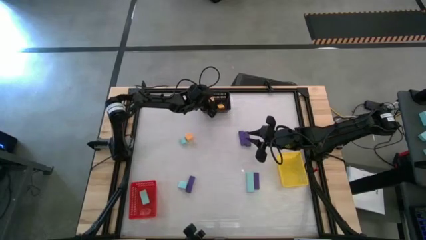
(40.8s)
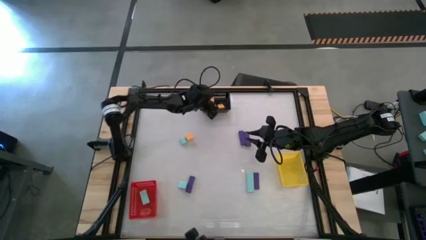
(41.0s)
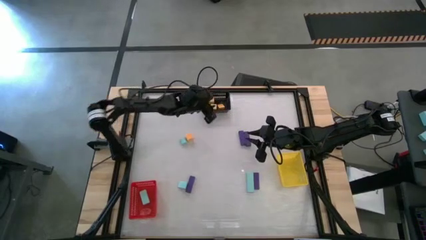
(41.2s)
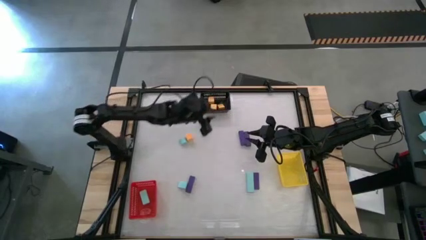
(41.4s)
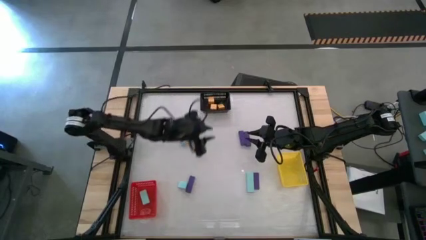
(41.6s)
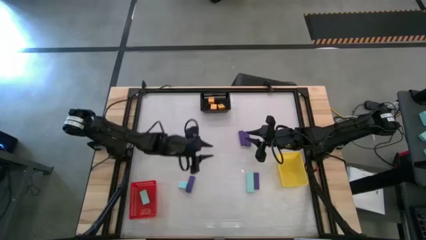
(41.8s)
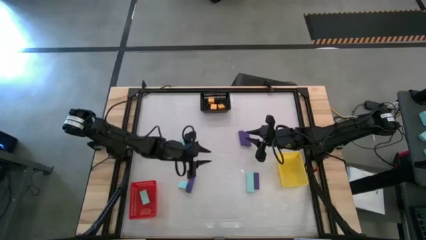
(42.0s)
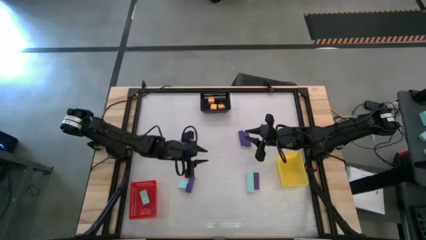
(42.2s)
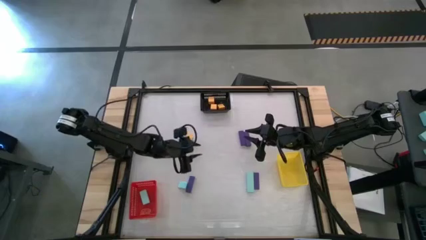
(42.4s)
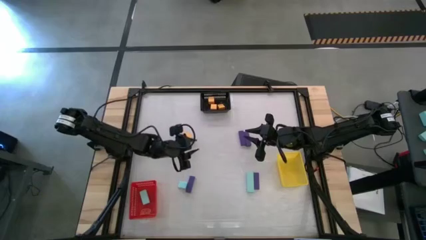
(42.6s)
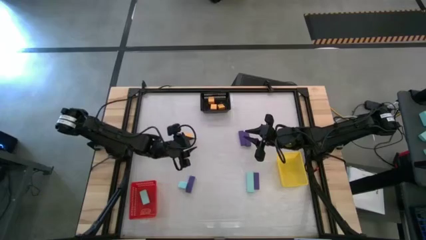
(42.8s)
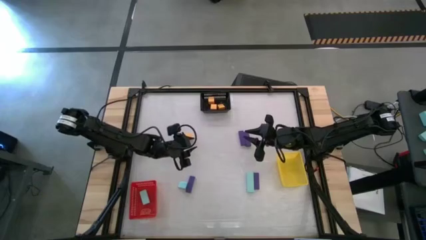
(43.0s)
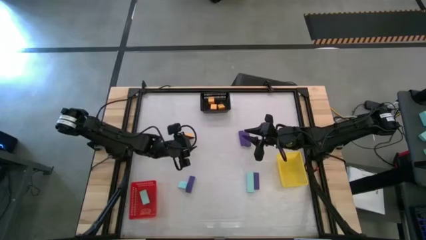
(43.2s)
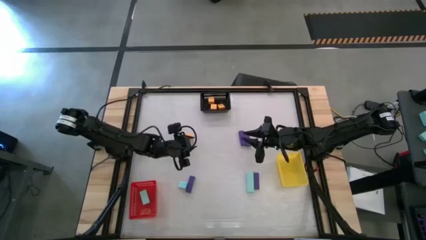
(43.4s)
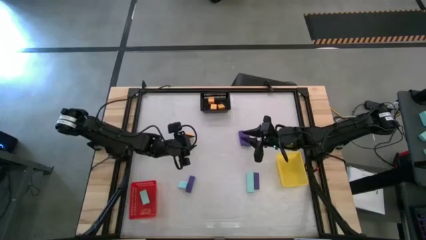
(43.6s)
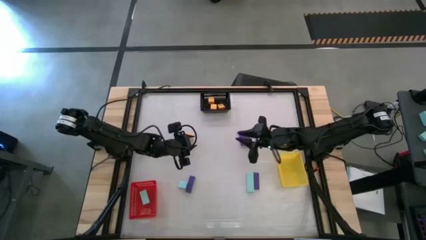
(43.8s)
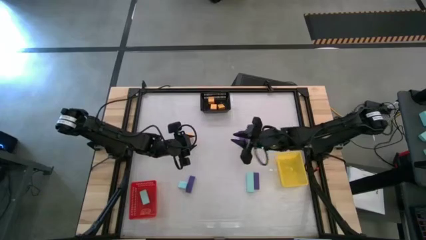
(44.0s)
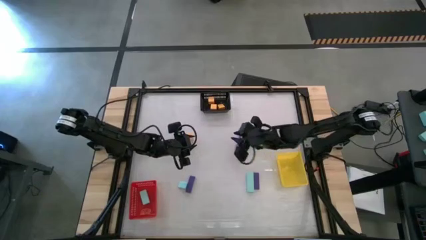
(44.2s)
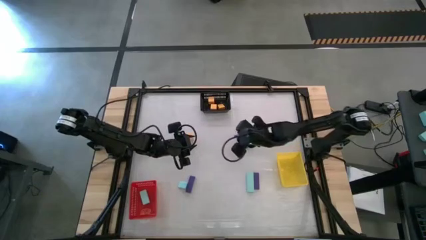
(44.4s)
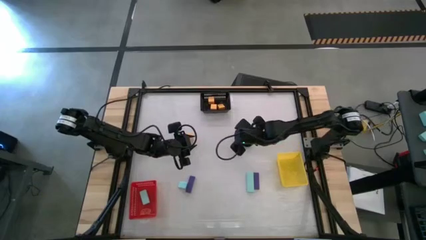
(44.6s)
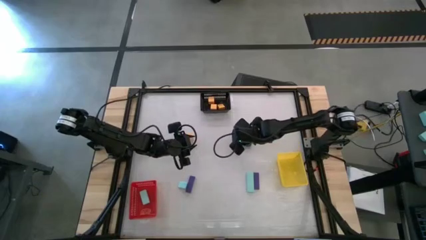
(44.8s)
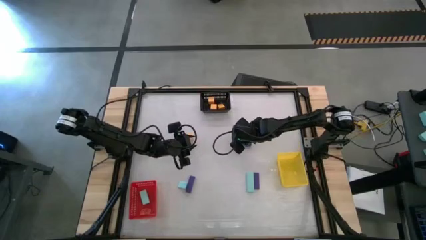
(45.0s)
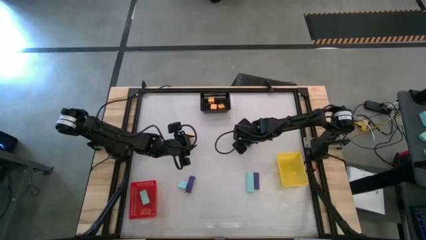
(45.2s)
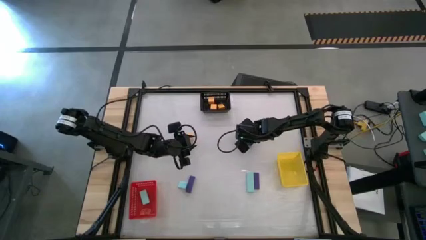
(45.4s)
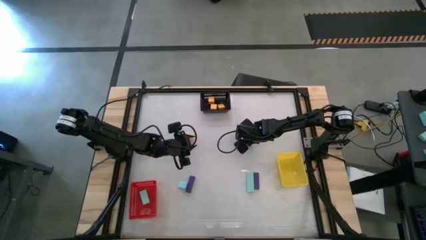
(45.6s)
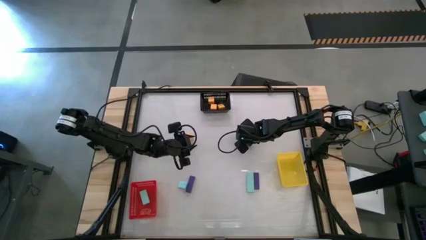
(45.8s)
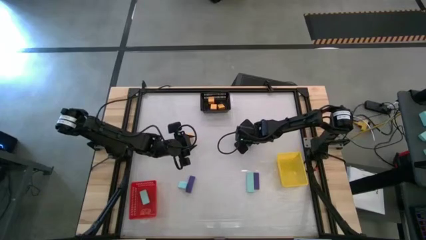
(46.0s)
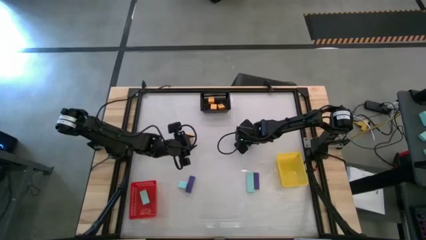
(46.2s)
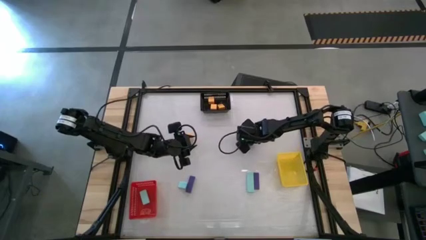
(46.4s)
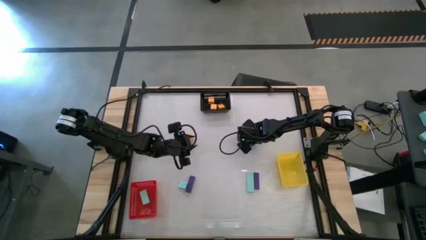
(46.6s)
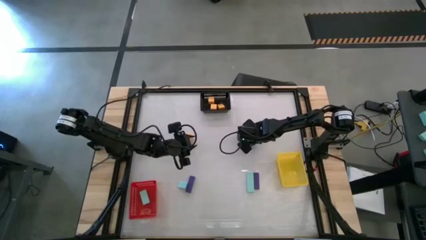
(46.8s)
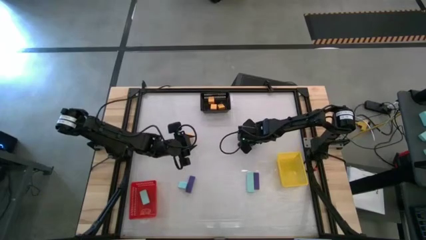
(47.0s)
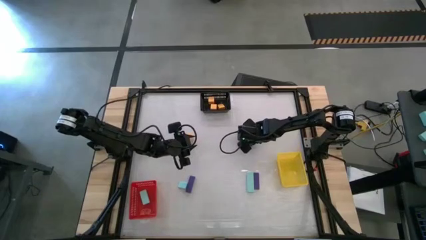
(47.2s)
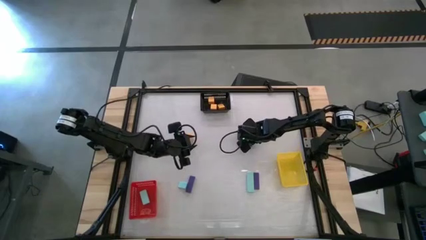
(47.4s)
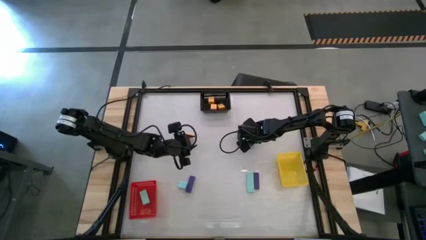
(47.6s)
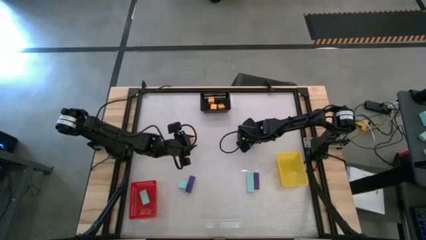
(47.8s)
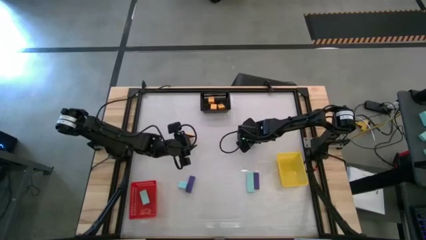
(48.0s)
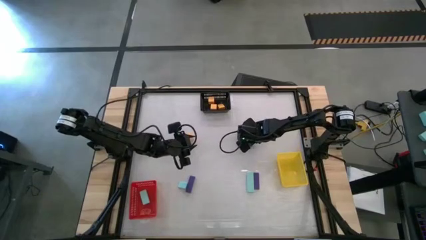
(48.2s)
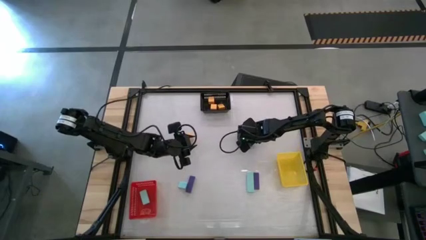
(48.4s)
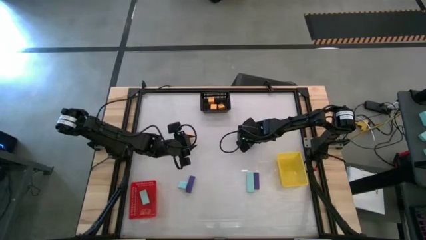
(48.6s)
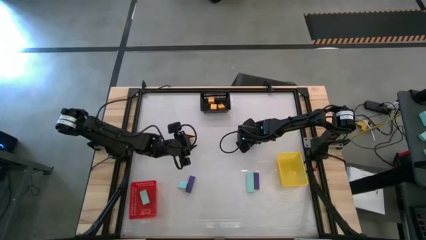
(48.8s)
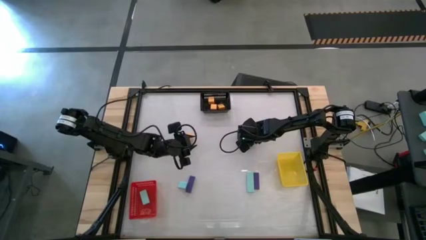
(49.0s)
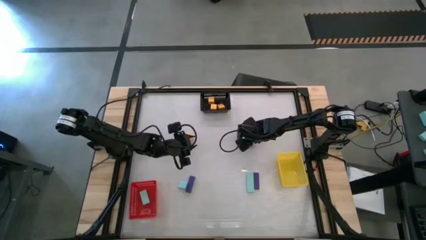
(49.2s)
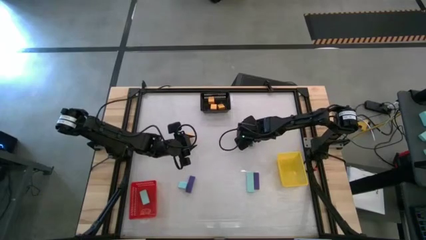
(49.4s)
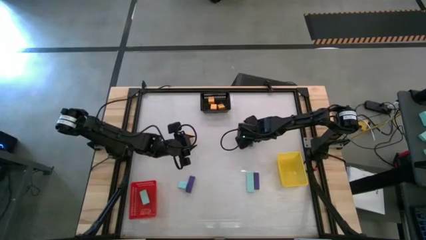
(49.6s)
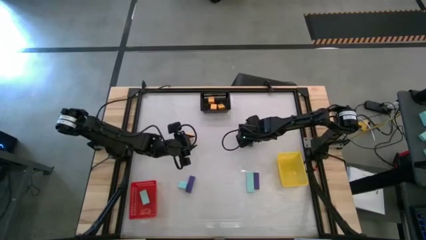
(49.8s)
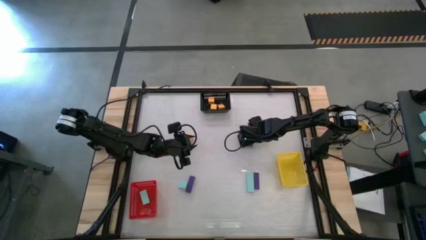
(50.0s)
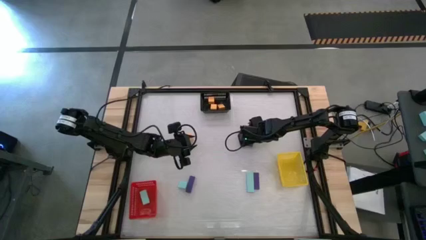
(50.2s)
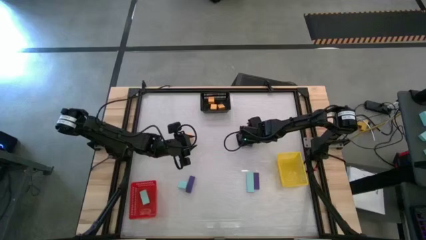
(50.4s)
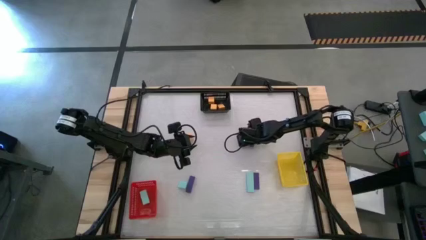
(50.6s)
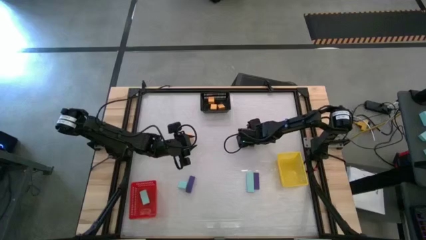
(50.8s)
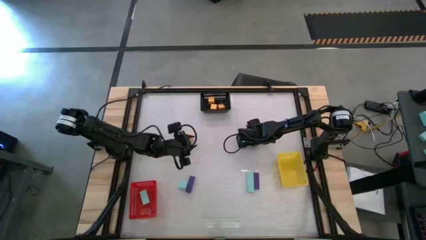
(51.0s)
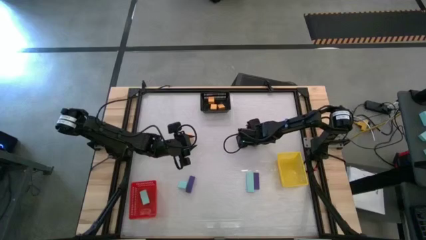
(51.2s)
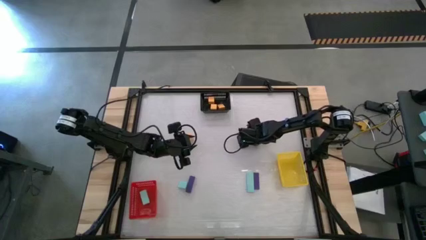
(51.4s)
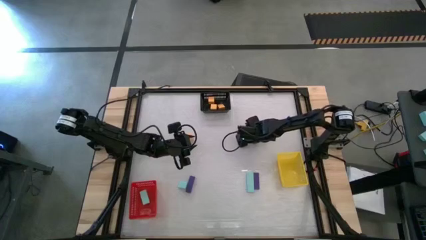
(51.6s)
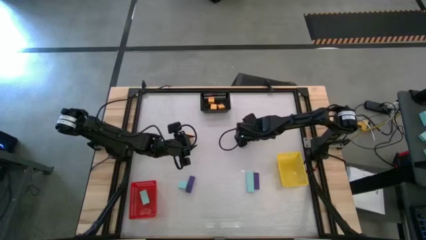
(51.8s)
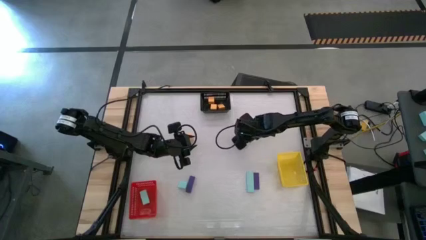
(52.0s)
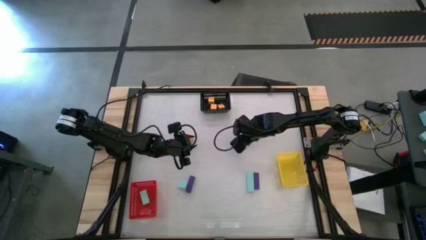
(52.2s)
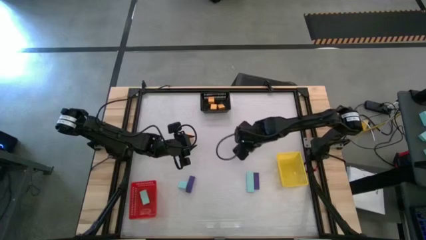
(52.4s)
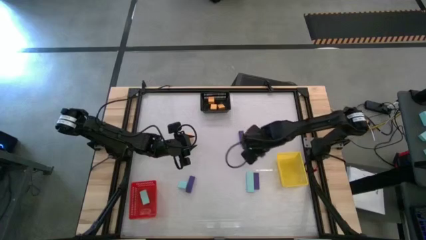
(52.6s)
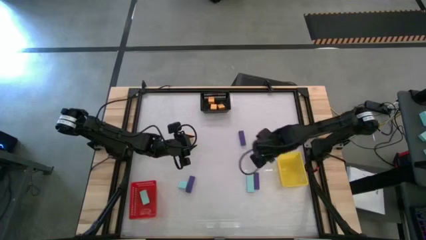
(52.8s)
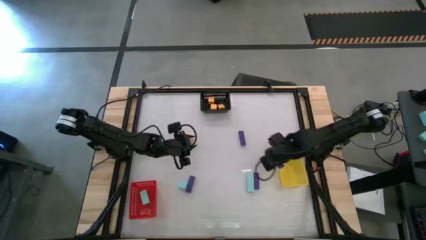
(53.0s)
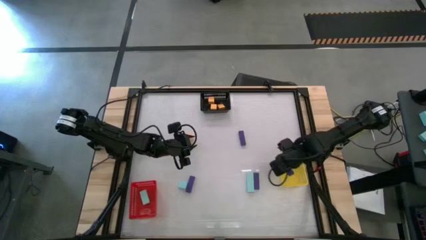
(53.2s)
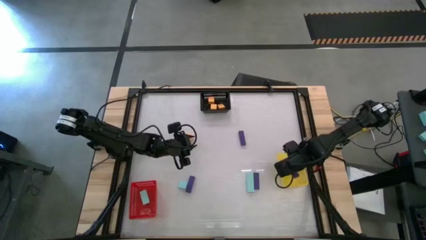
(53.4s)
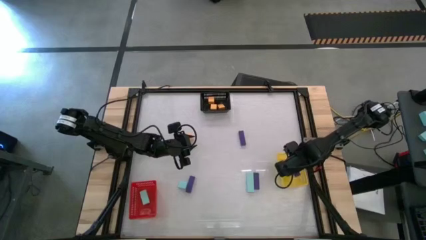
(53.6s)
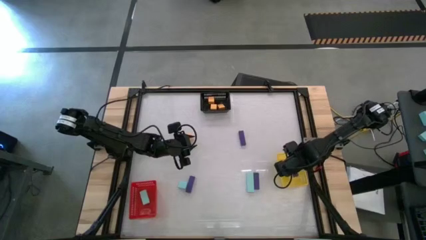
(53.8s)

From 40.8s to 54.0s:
Task: Sort & place blocks by color
Put the purple block into the yellow bin
